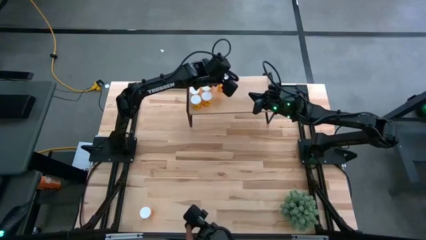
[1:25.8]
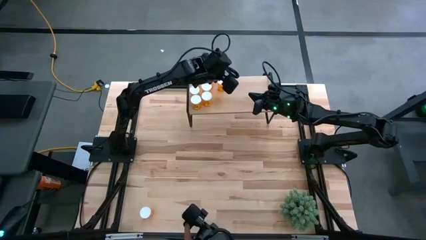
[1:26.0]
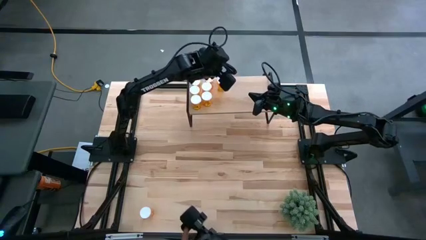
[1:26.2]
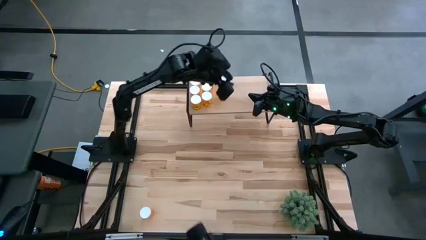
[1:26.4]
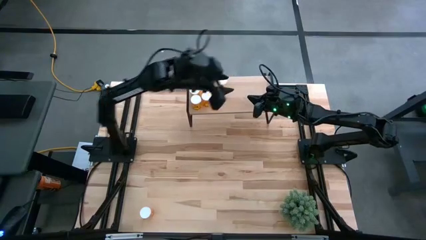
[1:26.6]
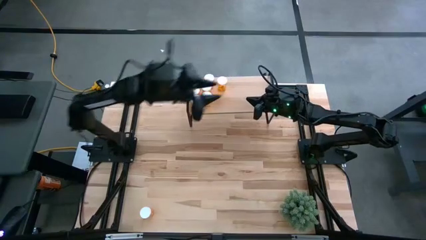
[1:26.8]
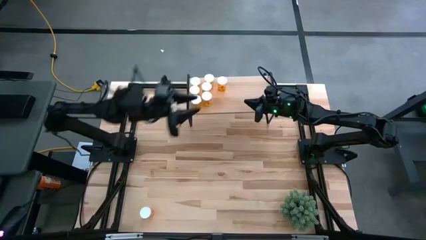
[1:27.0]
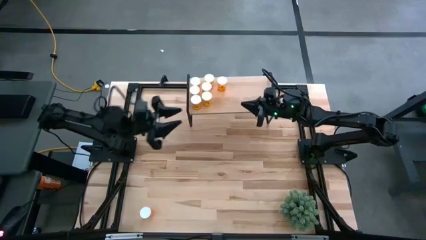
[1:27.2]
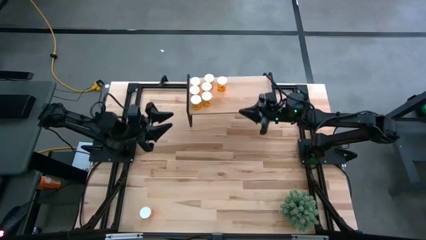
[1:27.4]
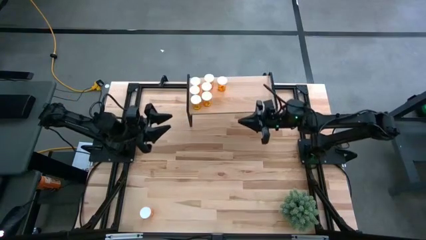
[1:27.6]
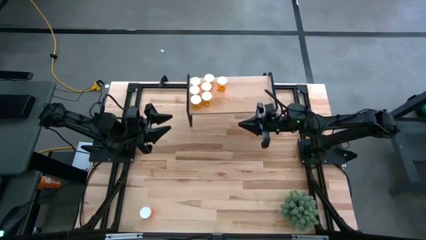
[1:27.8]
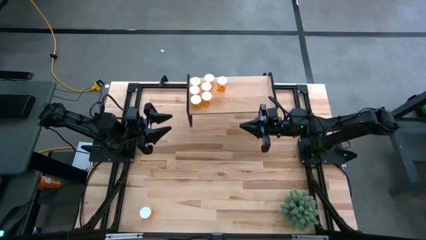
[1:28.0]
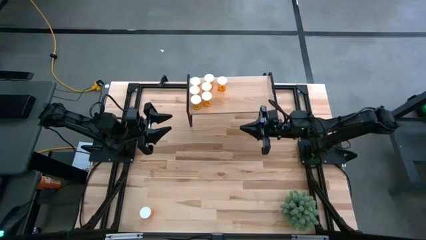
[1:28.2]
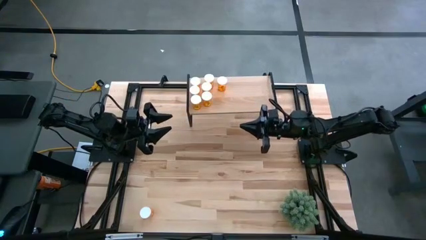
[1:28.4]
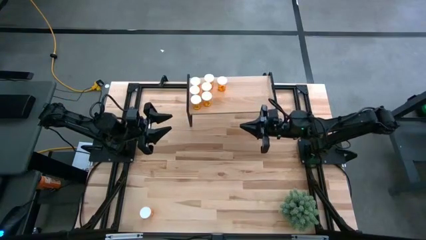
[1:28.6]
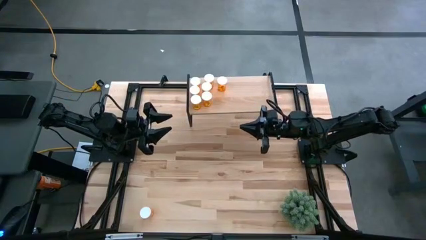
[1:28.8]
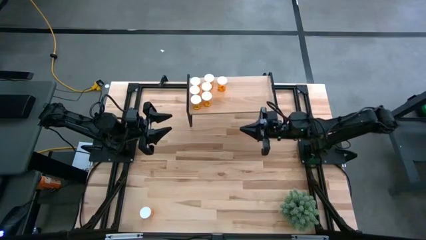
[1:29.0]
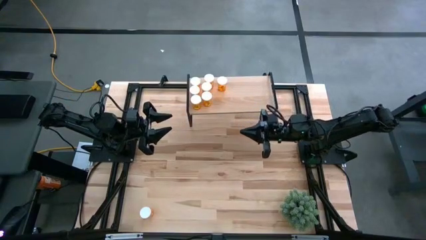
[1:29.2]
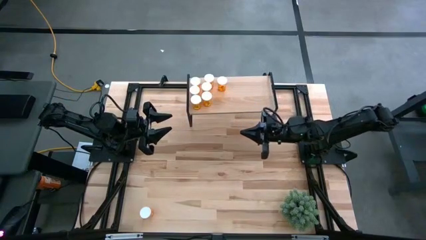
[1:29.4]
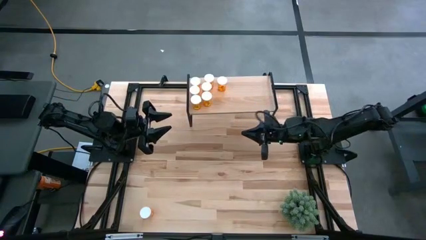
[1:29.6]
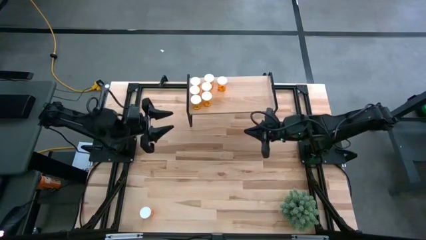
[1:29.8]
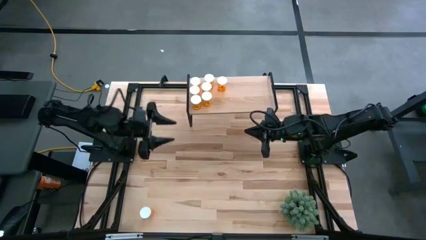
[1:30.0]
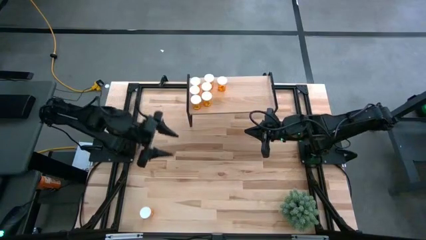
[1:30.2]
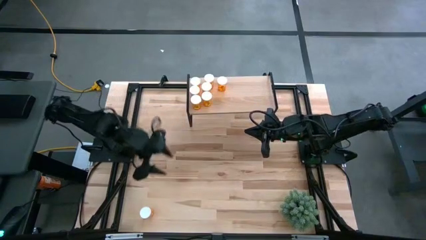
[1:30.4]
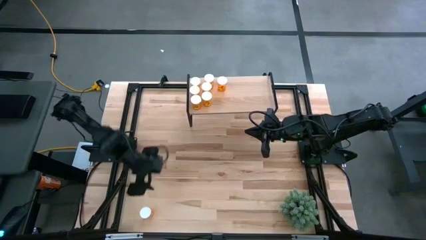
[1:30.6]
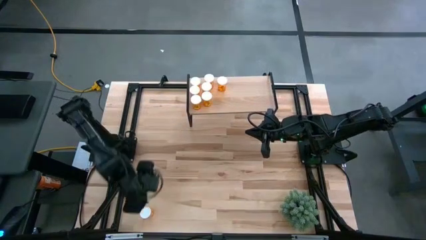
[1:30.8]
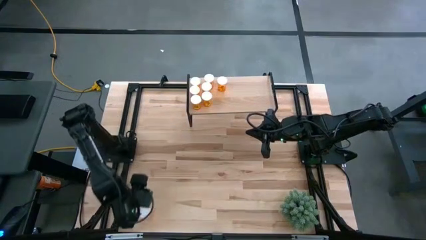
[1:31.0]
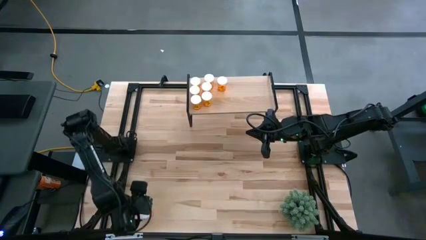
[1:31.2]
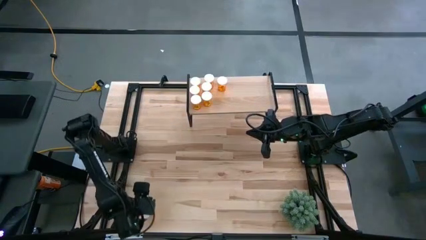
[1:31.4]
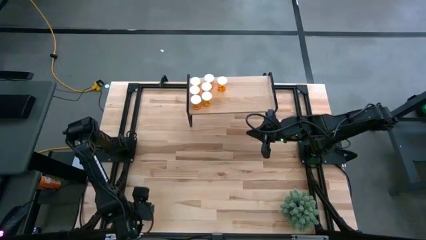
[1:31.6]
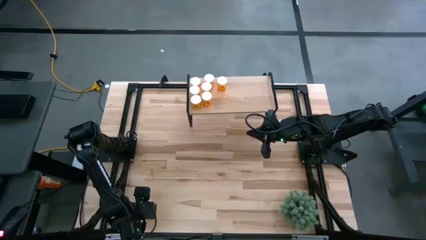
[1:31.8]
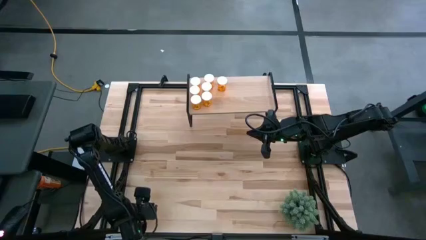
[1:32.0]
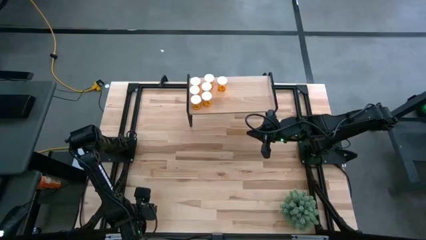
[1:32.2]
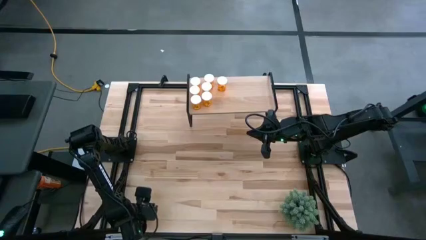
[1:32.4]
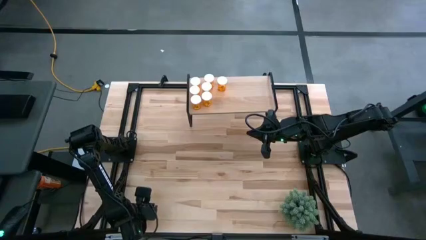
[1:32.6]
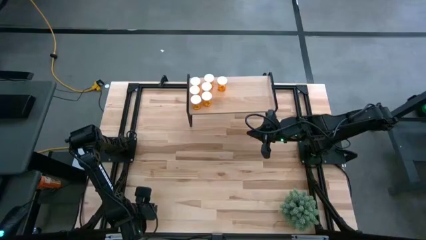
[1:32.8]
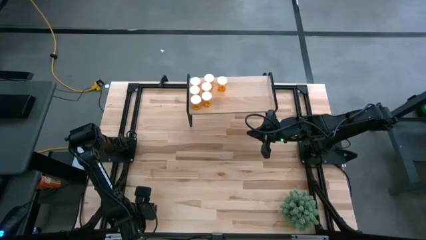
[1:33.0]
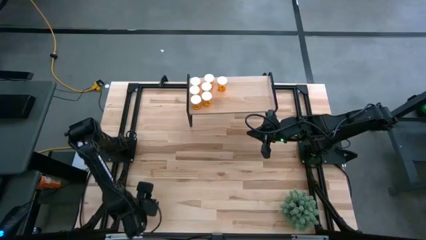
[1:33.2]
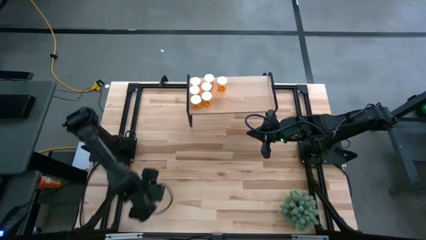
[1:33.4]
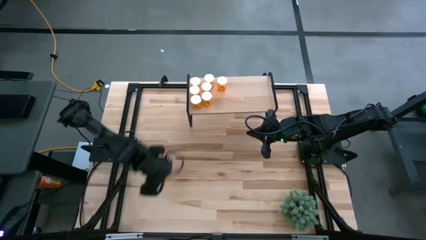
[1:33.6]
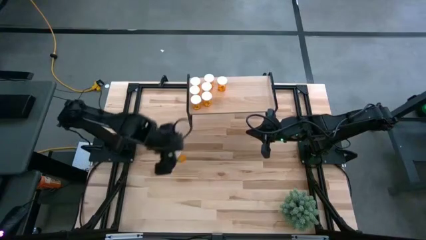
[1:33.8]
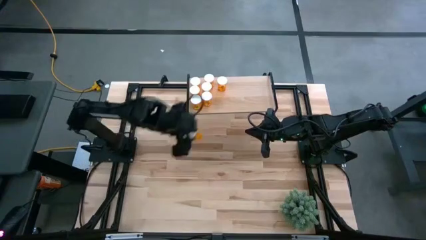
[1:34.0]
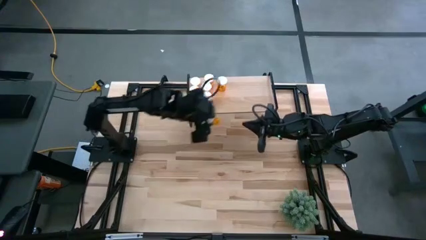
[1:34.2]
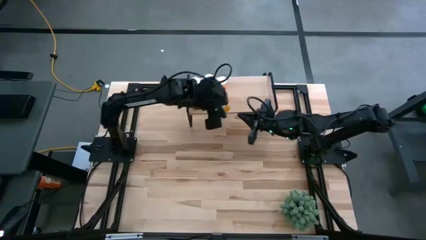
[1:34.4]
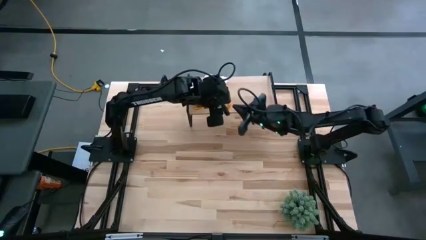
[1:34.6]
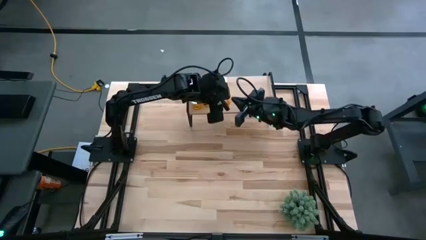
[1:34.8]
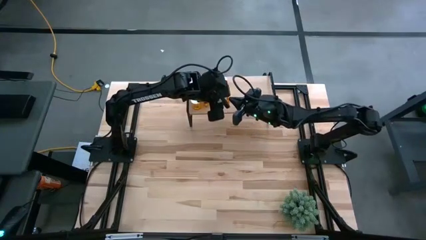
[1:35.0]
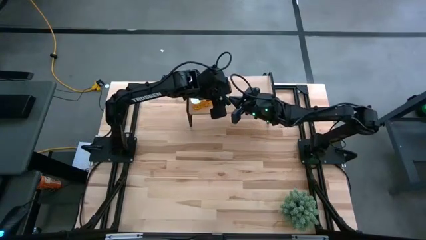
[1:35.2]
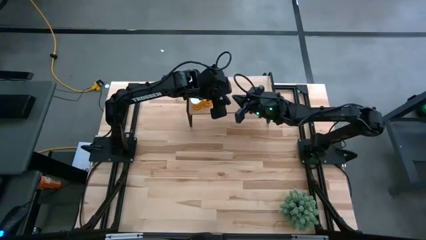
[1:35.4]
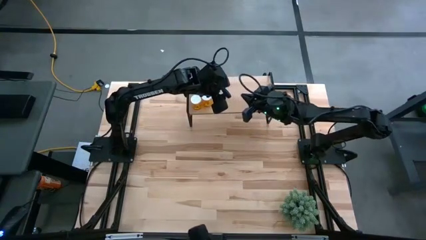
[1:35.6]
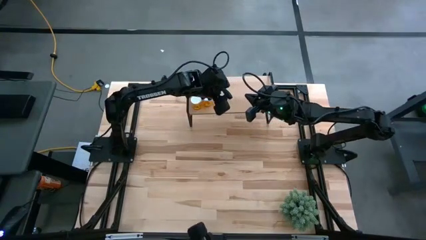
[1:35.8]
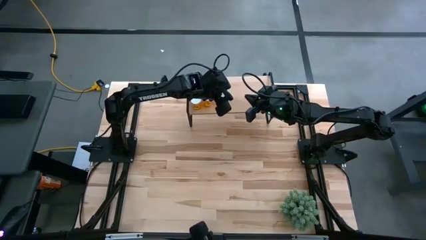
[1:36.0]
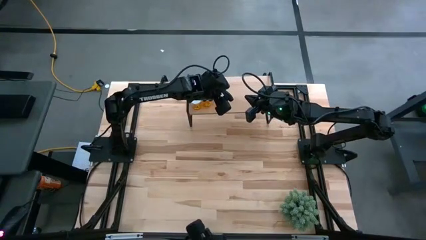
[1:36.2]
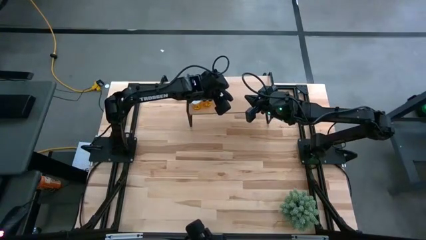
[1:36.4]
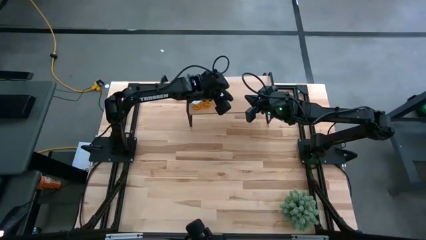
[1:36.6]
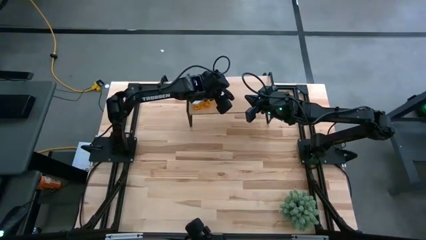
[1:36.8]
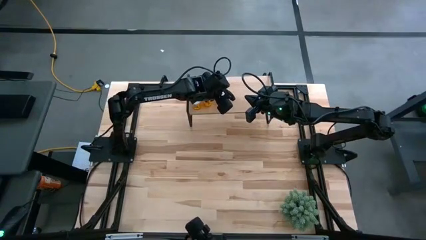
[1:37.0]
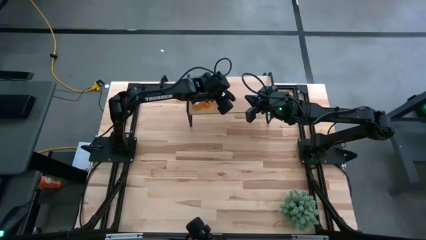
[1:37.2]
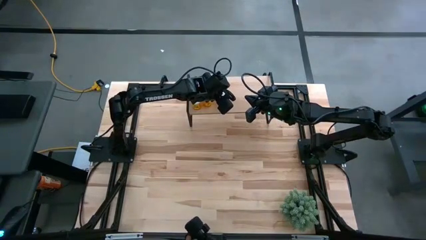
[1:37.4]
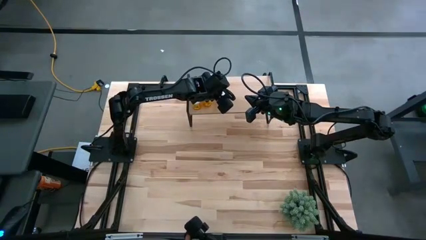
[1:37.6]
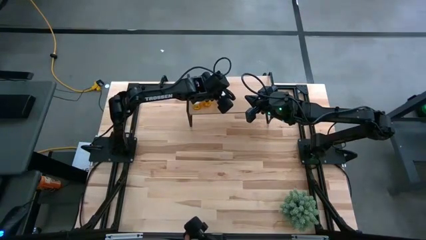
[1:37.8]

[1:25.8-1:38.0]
Task: Pick and place medicine bottles onto shelf by color
Put the orange pill bottle on the shelf aligned with the other orange pill bottle

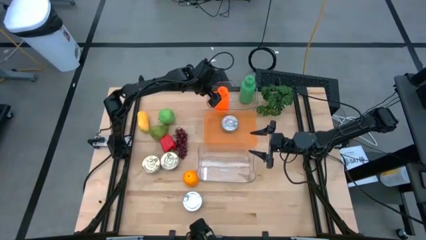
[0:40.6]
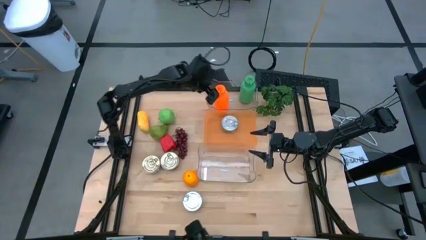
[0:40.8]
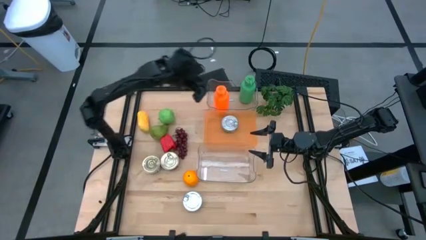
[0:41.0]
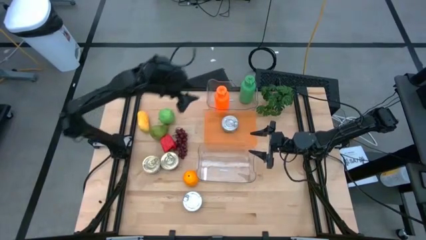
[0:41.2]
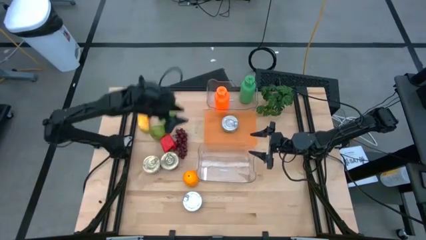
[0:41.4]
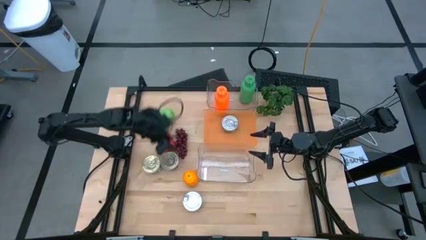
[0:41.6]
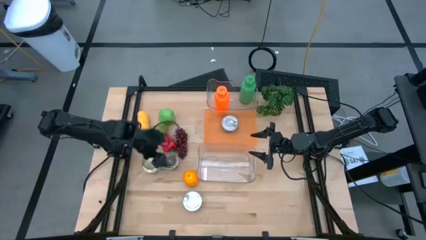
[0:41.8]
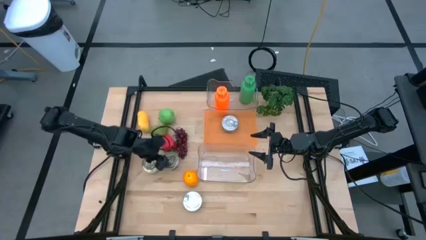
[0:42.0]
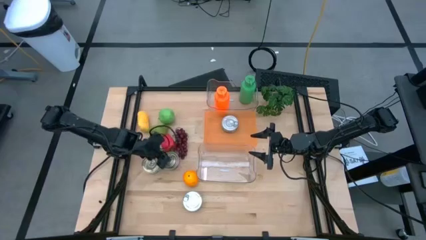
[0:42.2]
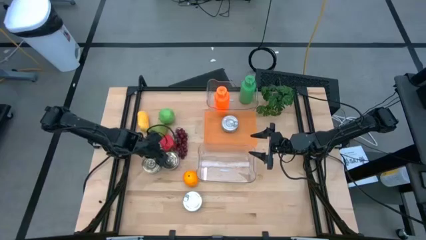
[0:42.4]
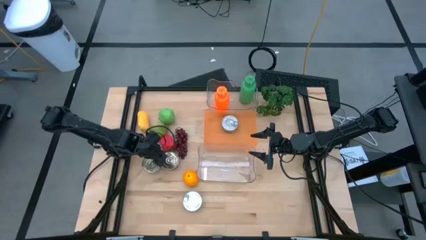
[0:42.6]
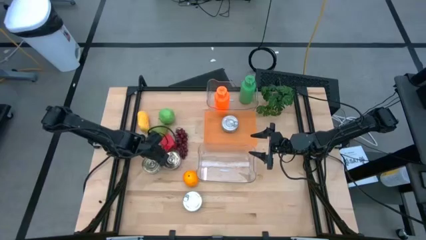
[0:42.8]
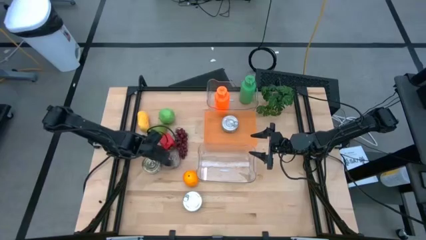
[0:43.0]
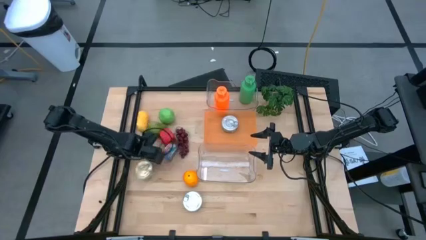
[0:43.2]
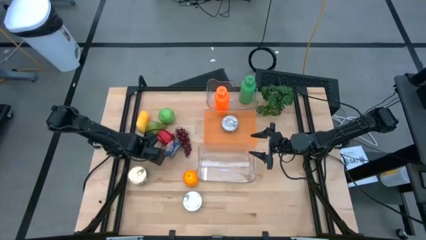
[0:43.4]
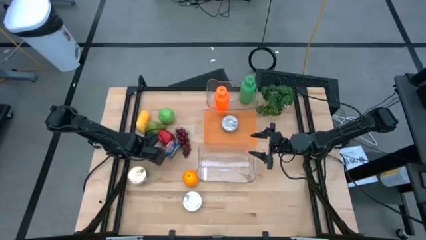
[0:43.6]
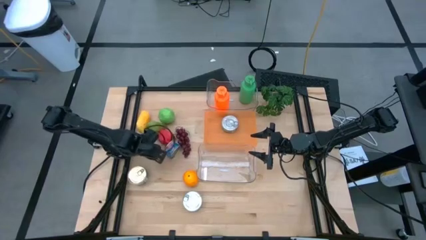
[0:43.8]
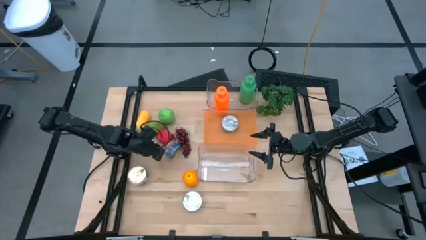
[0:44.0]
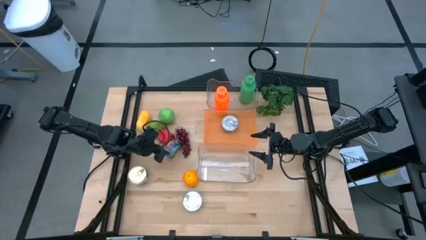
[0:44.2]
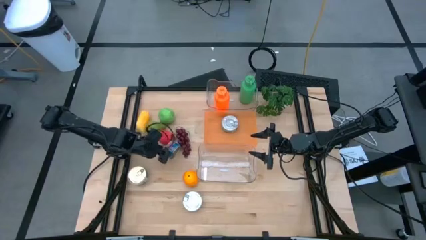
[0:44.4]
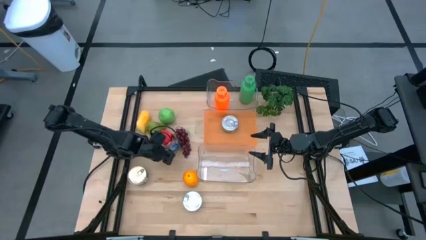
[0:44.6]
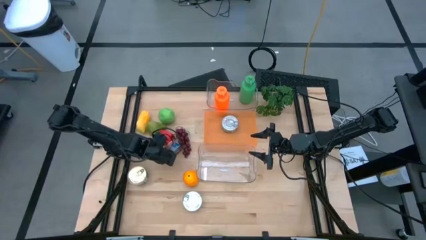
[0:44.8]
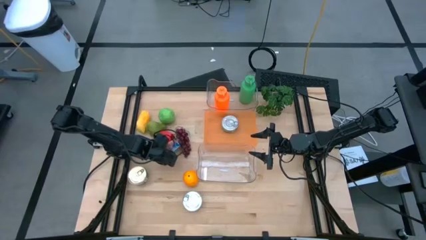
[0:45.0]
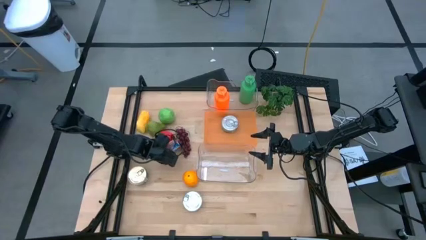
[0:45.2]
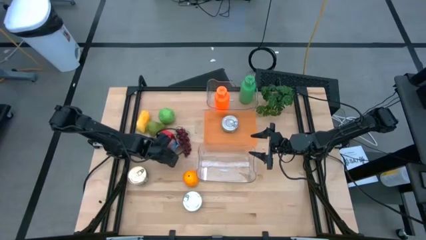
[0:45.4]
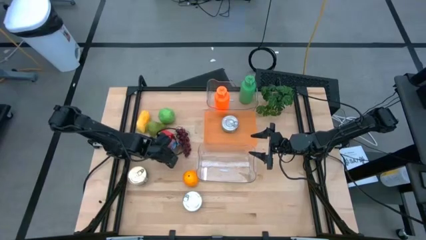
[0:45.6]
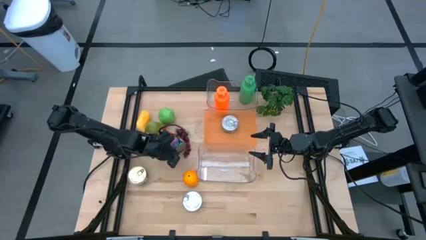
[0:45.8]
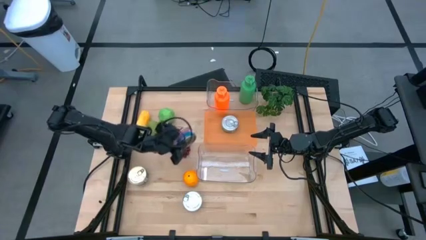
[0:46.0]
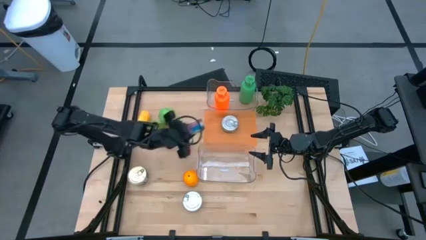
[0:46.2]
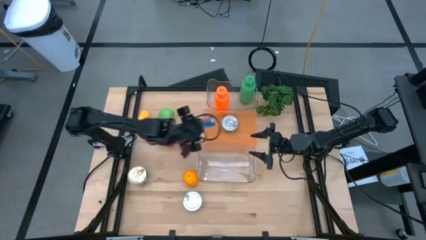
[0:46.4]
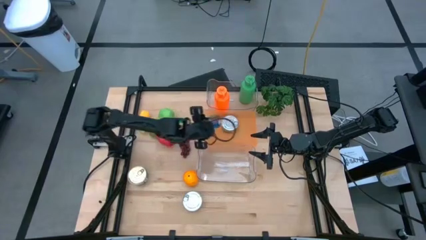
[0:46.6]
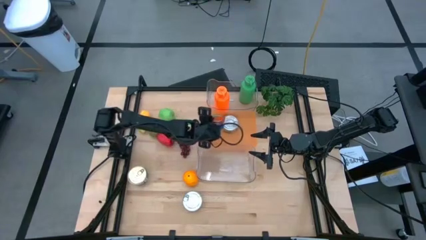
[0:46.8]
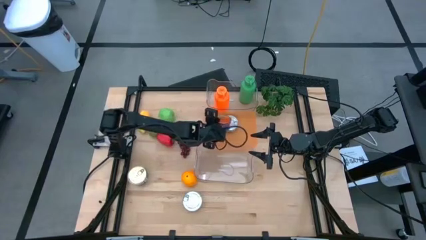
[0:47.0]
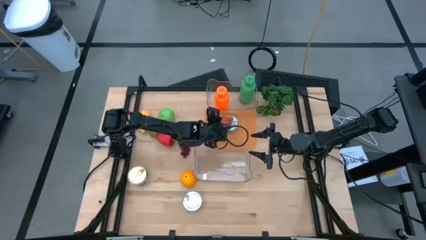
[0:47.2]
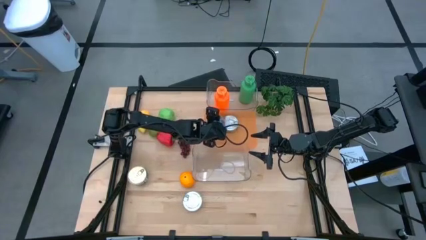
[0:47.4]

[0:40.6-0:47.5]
Task: Pick & Place Food Item
Put the right blue pink tuna can into the orange bin
